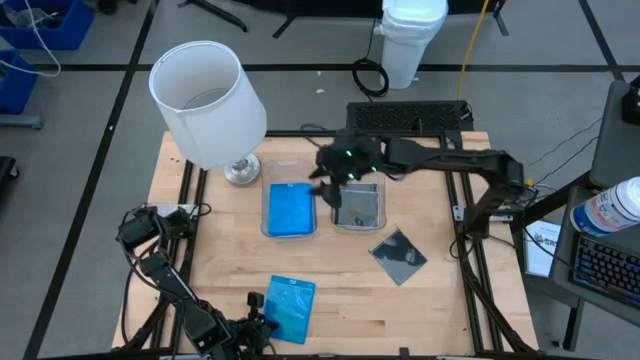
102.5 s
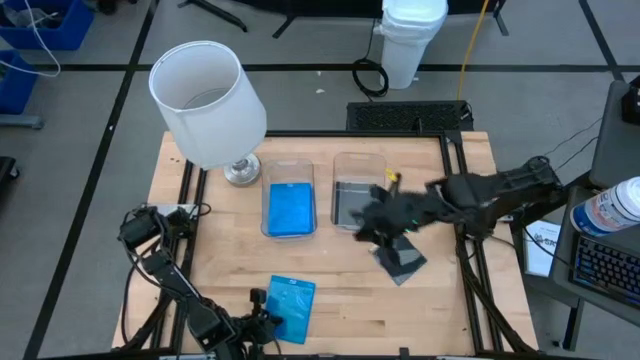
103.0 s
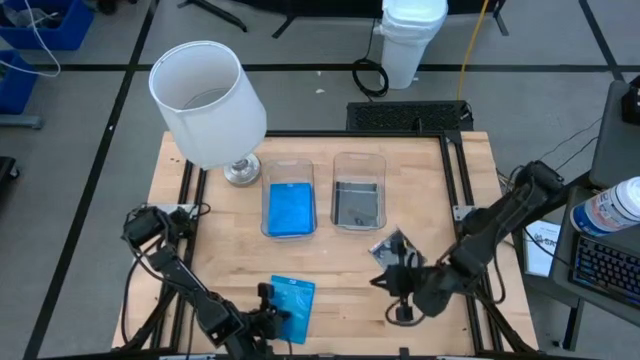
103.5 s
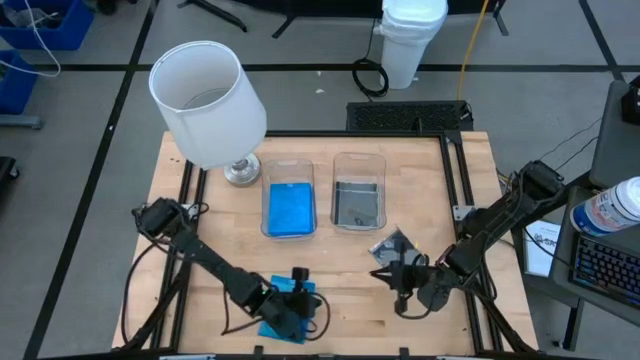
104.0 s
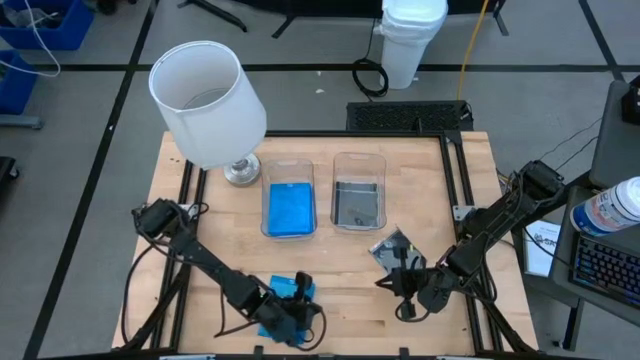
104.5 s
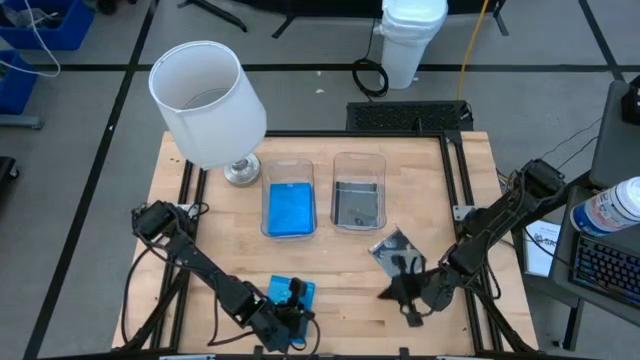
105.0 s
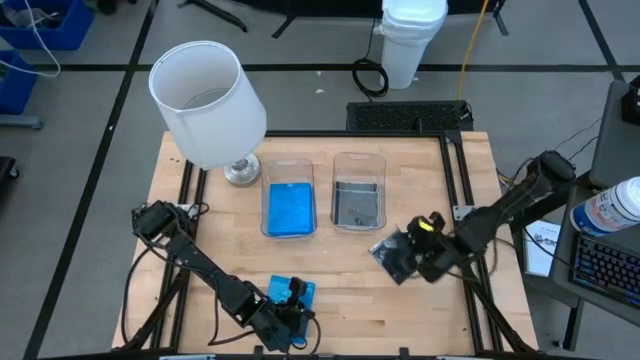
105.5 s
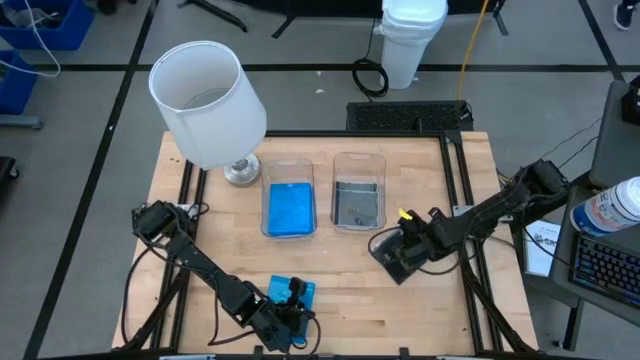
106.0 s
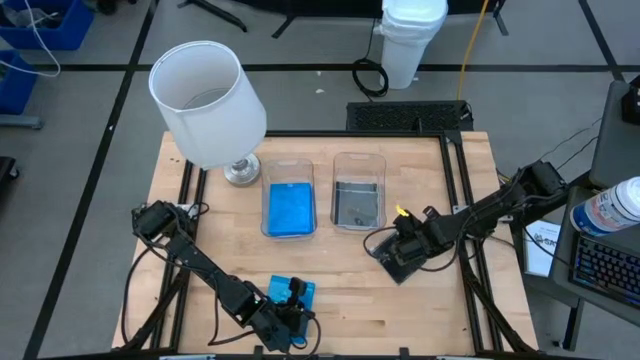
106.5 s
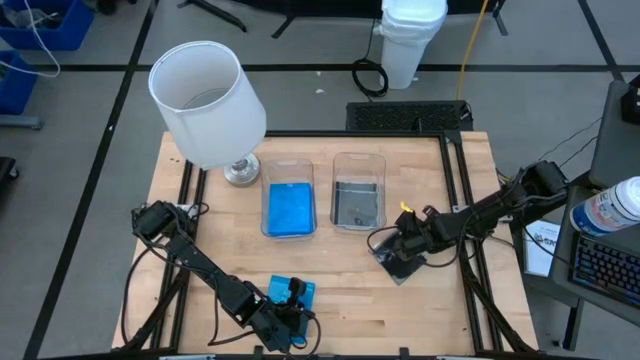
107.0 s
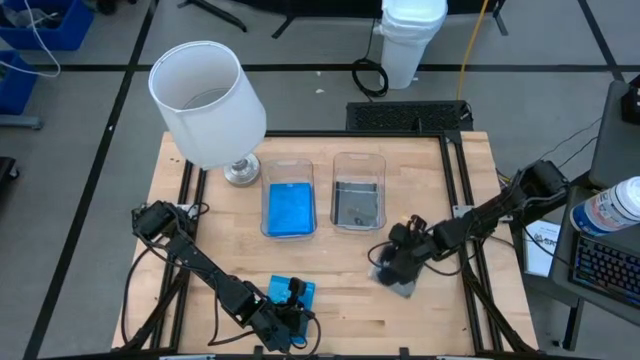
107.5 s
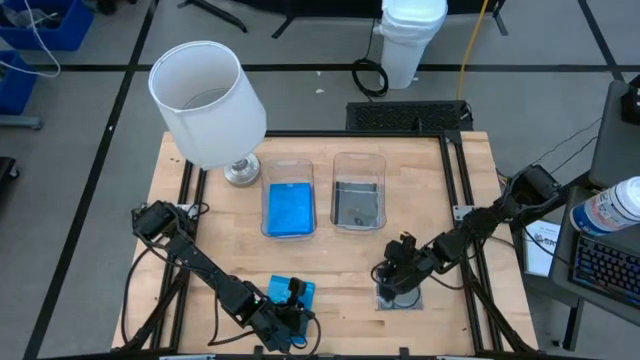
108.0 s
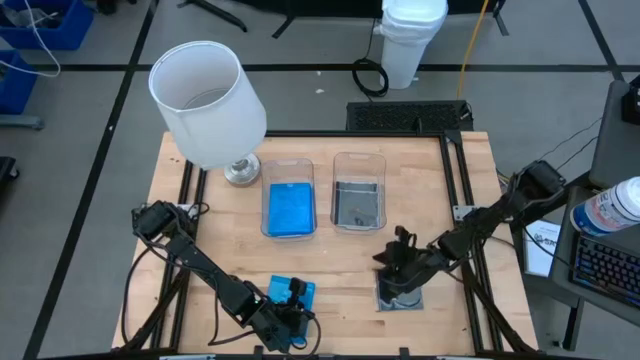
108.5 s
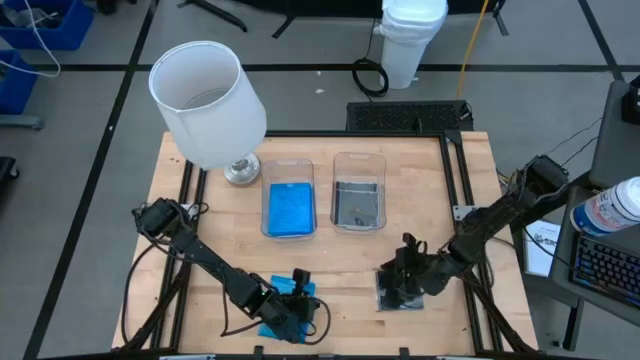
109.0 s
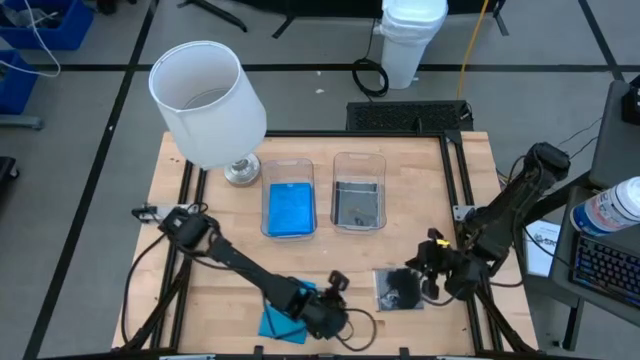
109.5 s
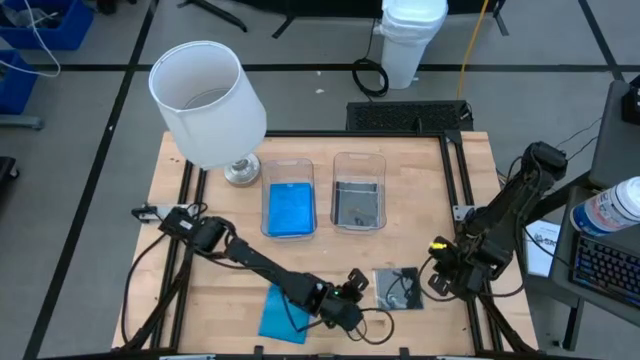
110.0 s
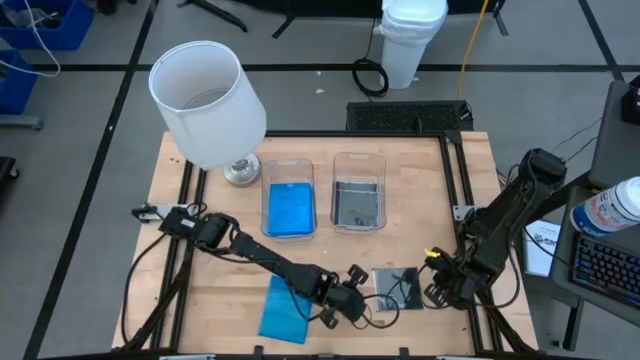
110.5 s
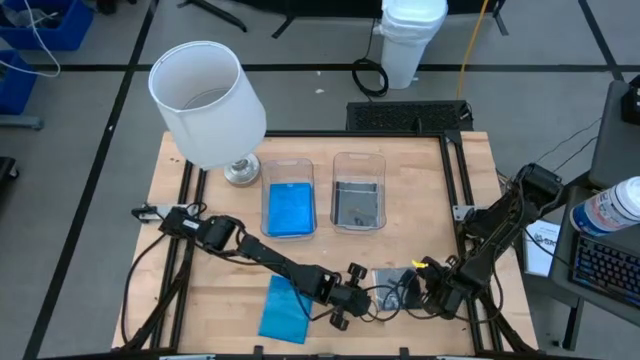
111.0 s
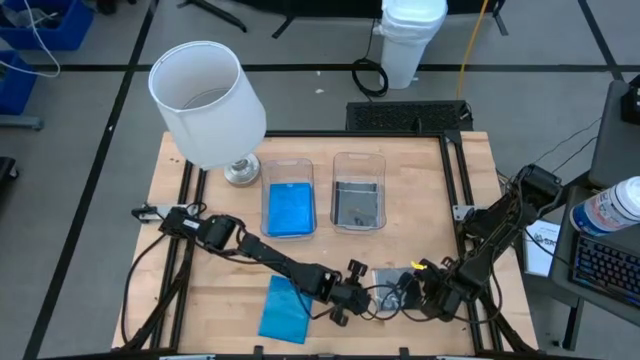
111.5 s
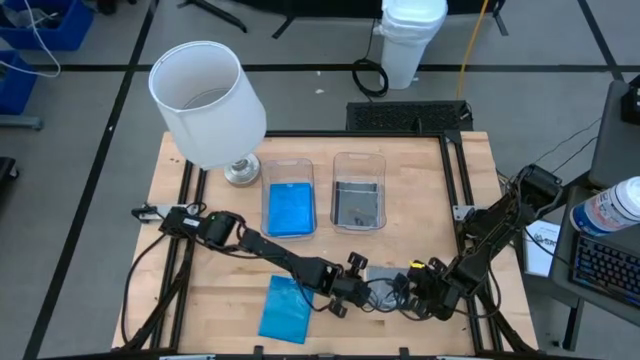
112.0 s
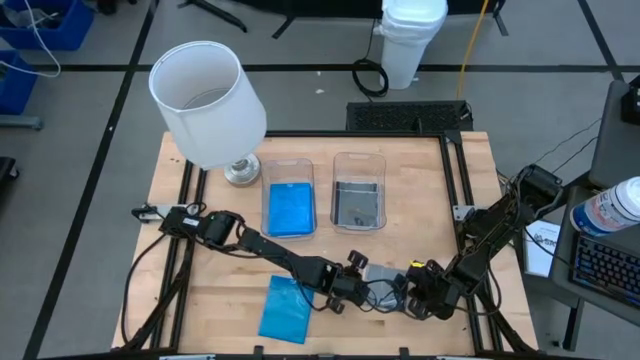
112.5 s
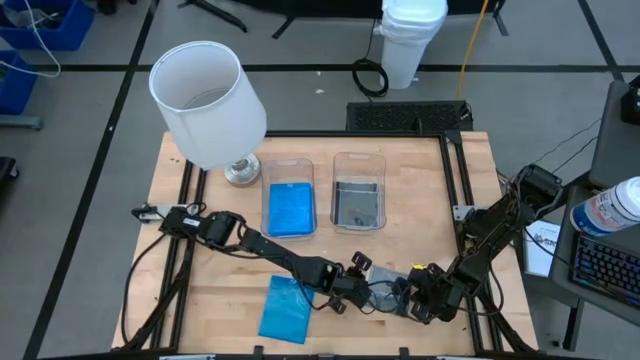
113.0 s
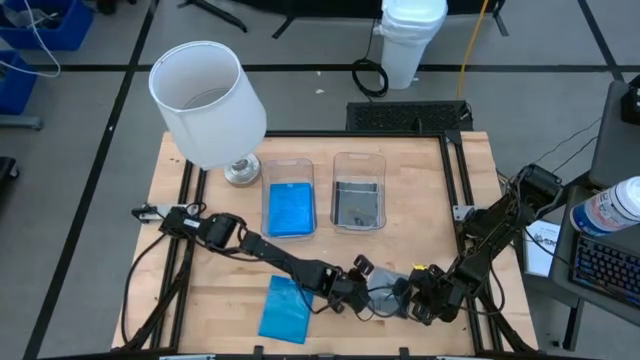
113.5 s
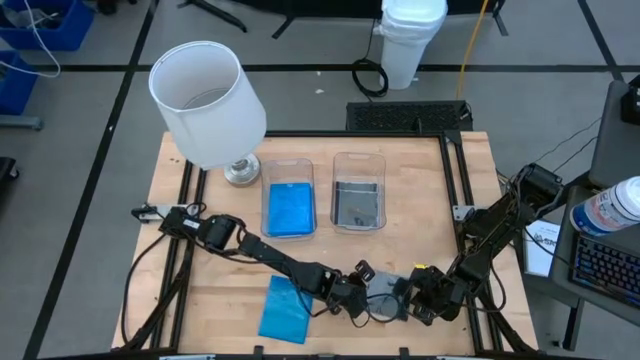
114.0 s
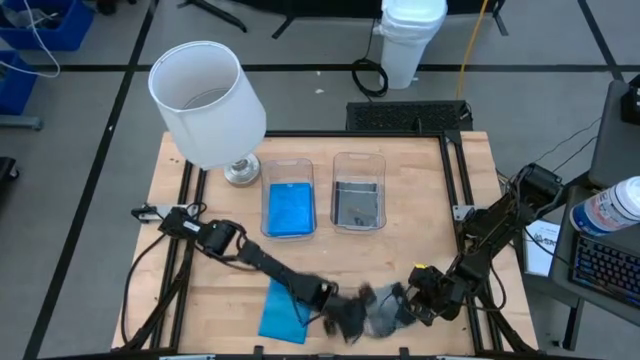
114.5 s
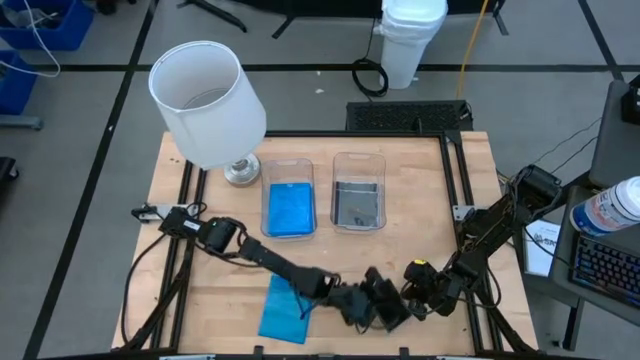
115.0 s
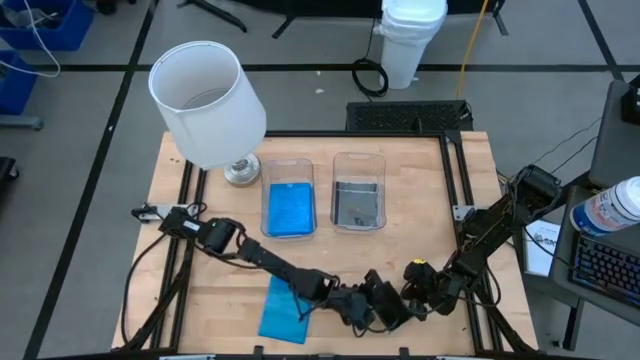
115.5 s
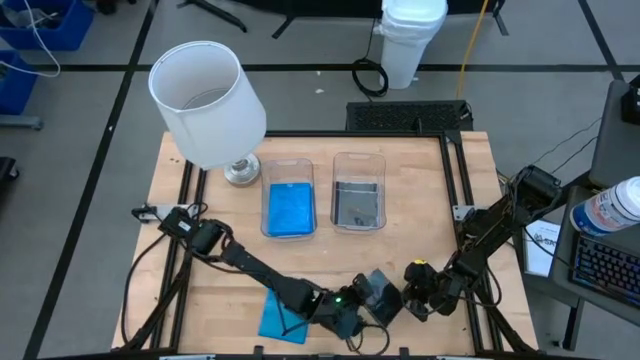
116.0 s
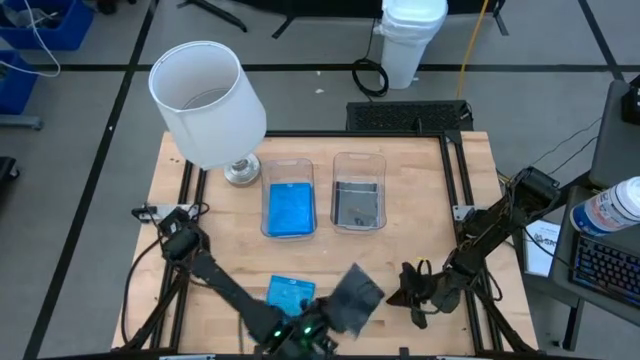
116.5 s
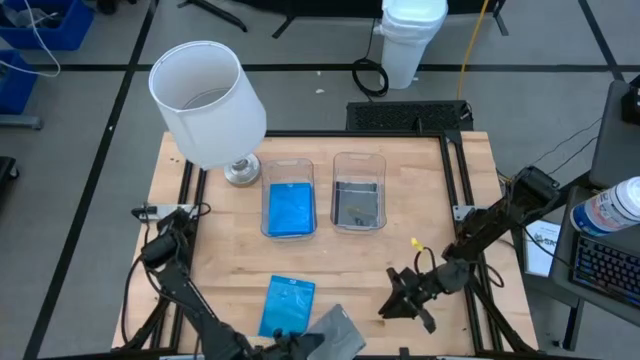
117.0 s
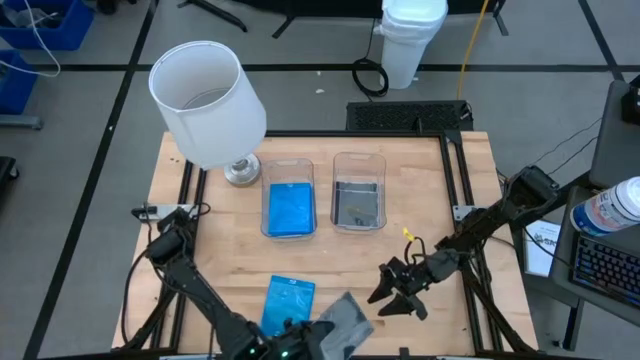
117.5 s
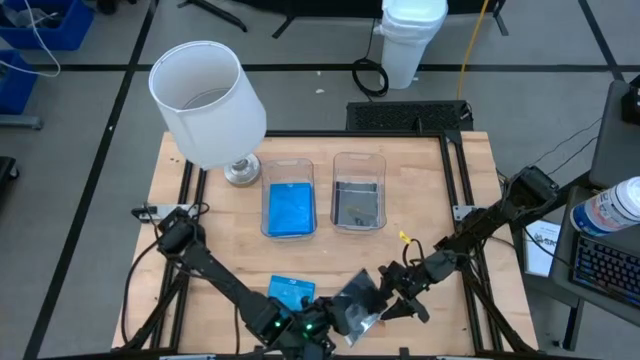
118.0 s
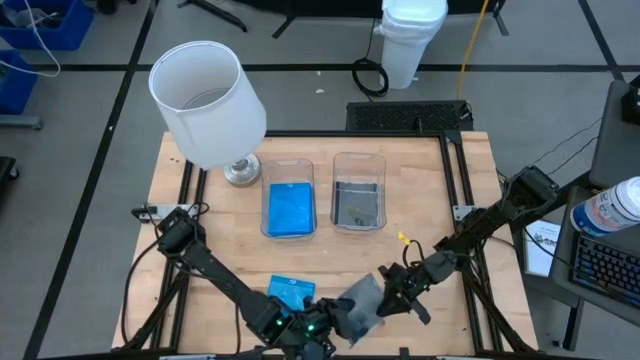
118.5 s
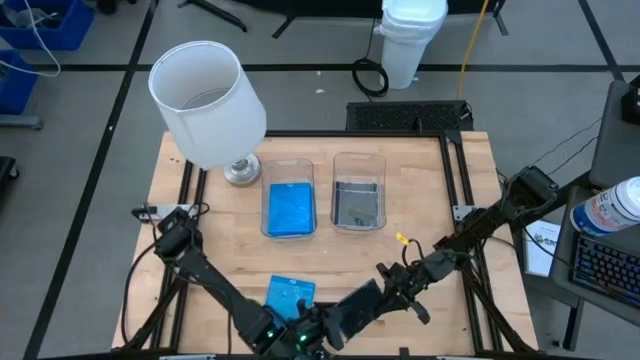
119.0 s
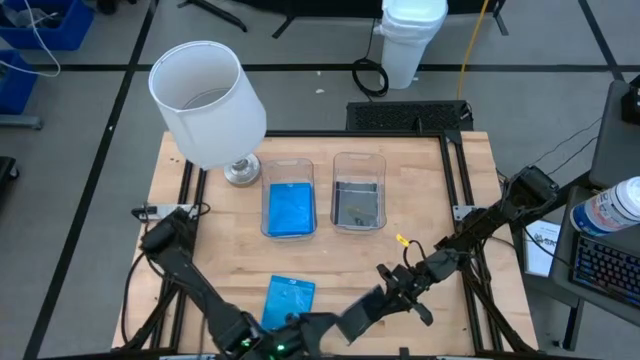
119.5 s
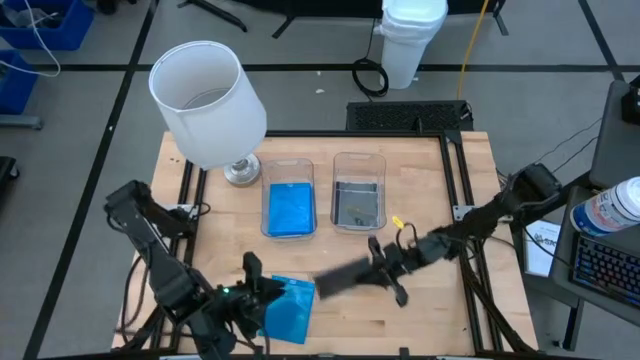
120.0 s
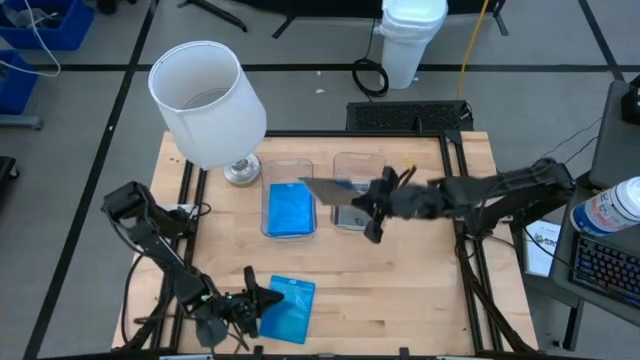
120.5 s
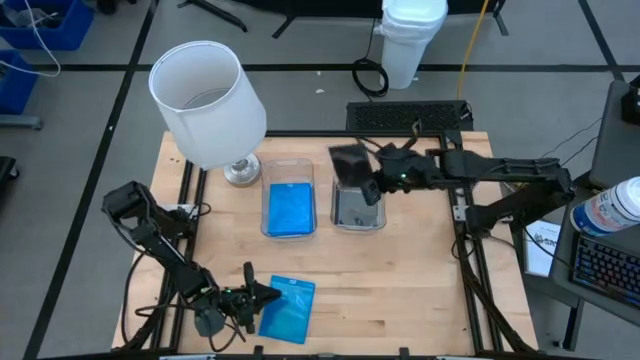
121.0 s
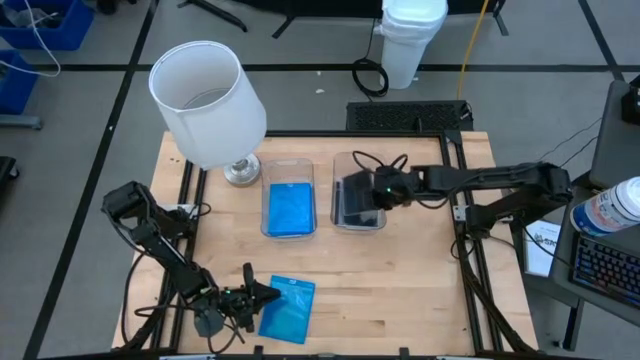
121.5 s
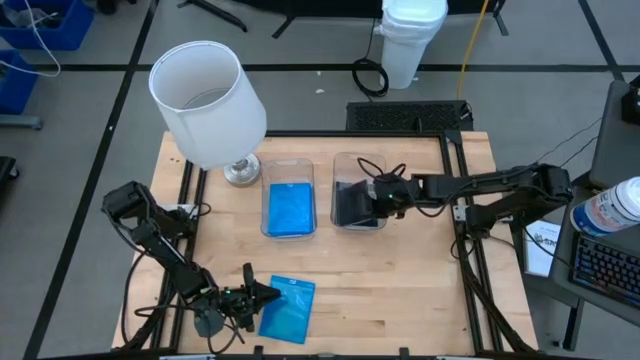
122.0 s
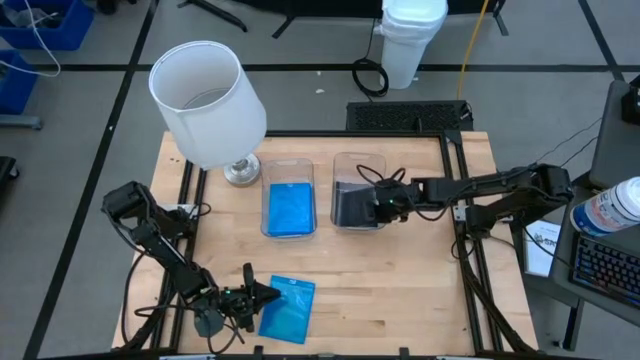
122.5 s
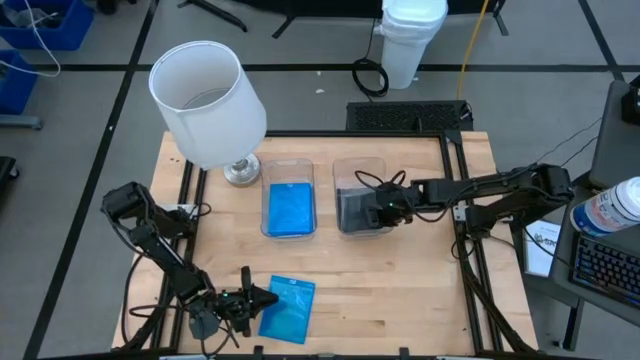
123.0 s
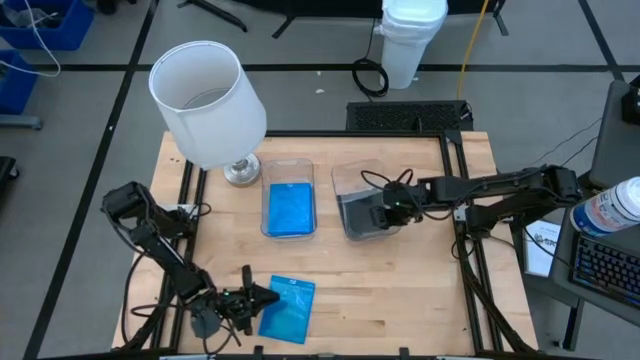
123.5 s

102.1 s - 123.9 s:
Task: Pick & place jewel cases by type
Put the black CD case into the right transparent bin

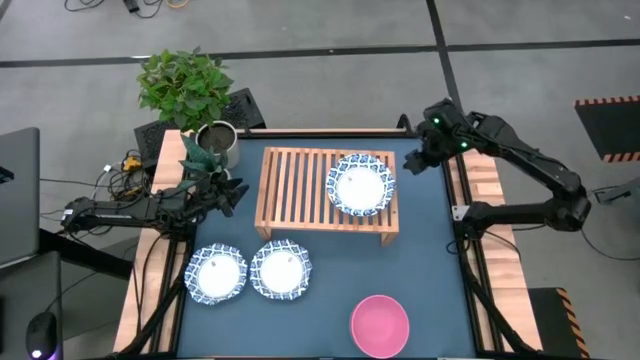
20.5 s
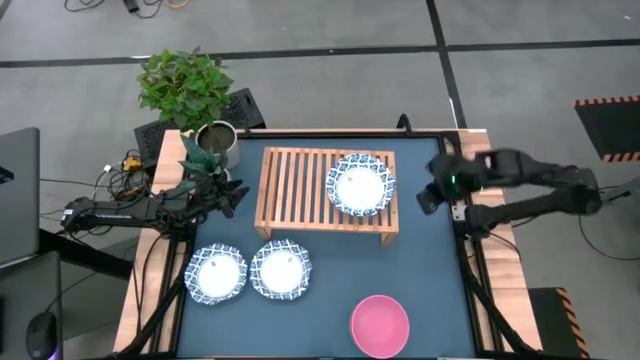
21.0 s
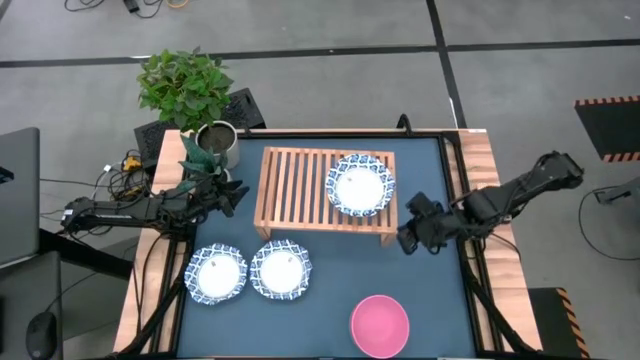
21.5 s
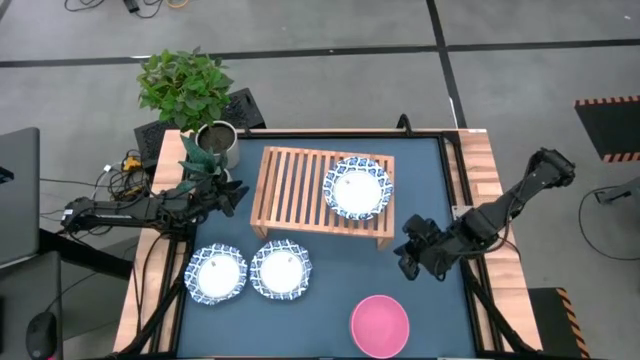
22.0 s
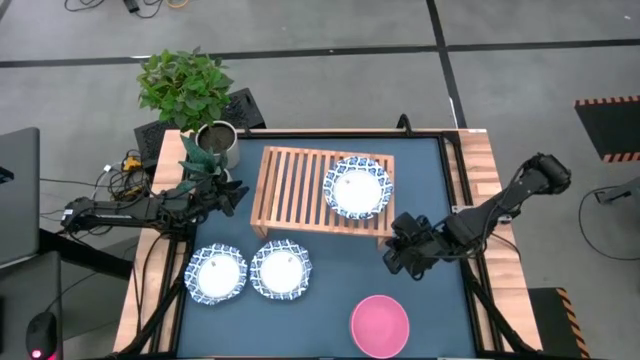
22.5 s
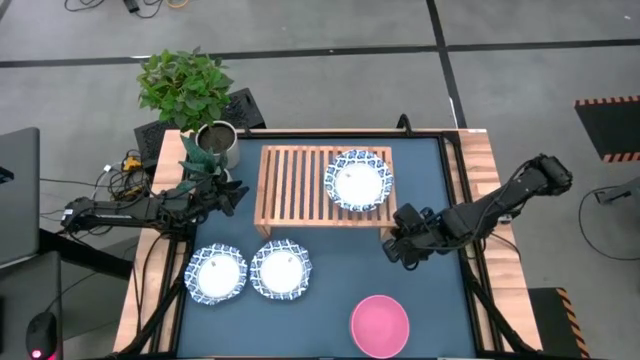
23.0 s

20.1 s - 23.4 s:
Task: Place and stack bowls onto a shelf
Adjust the shelf on the table
